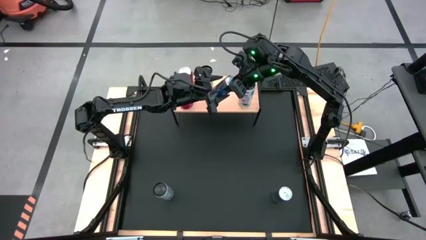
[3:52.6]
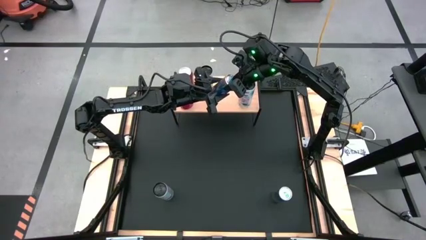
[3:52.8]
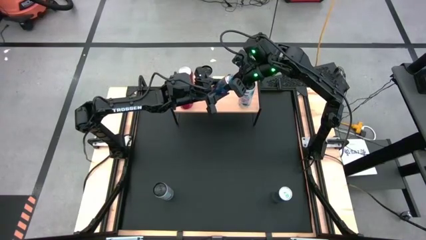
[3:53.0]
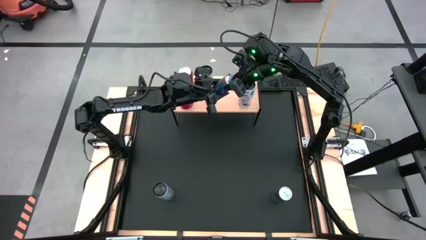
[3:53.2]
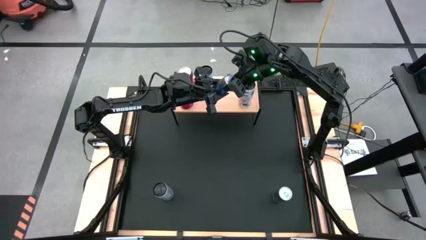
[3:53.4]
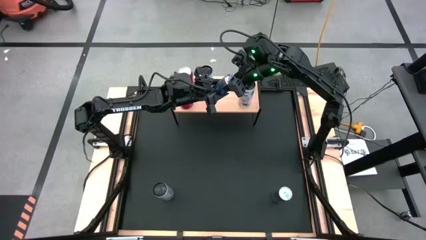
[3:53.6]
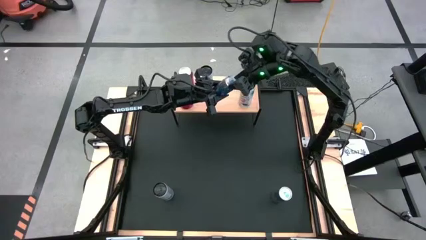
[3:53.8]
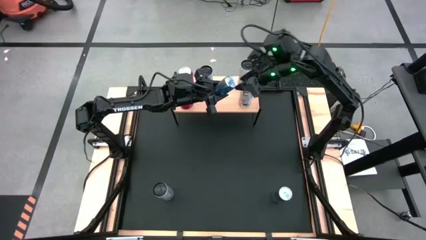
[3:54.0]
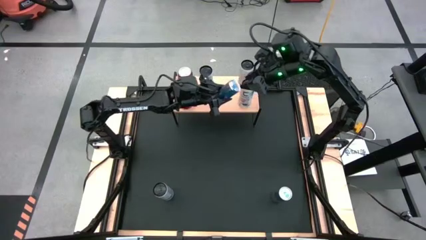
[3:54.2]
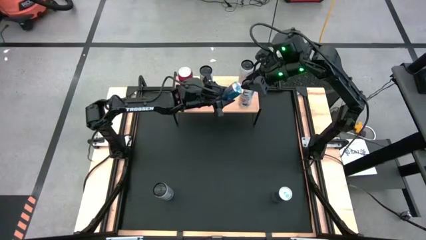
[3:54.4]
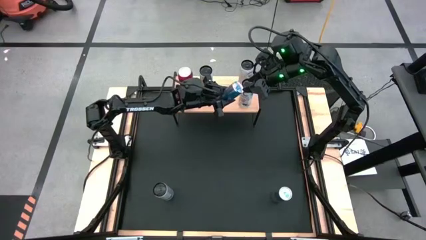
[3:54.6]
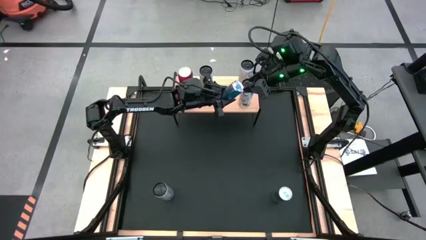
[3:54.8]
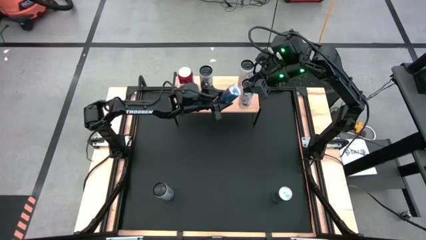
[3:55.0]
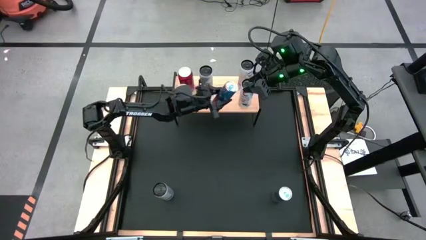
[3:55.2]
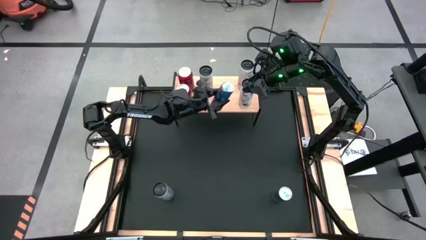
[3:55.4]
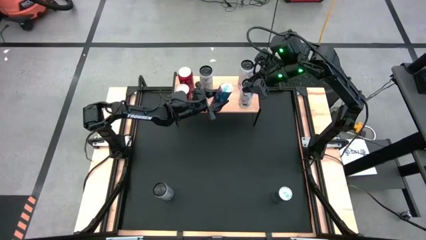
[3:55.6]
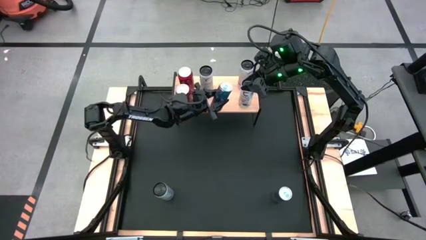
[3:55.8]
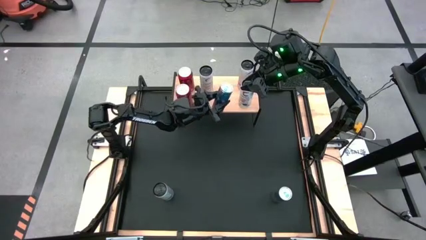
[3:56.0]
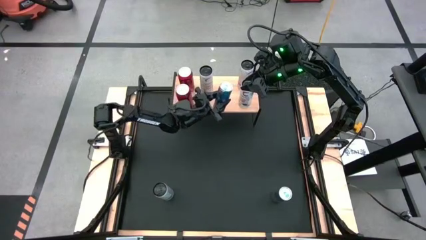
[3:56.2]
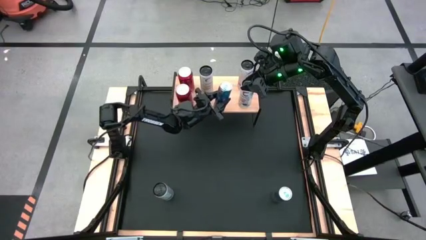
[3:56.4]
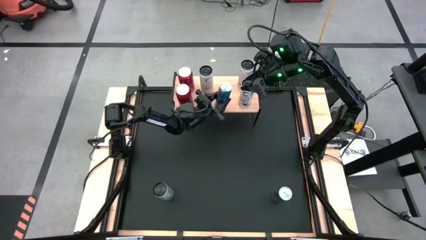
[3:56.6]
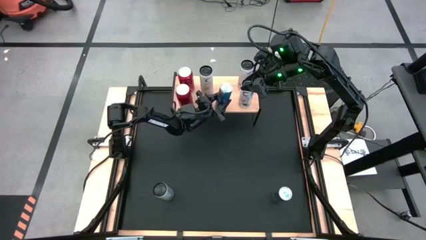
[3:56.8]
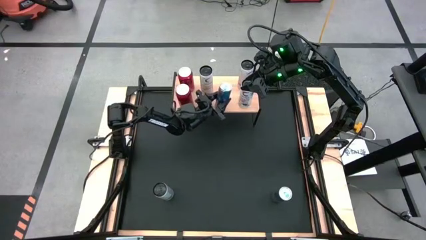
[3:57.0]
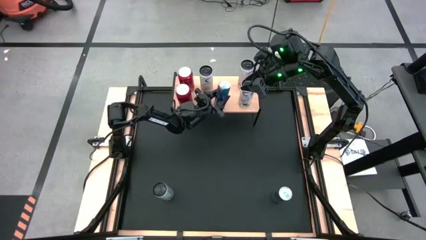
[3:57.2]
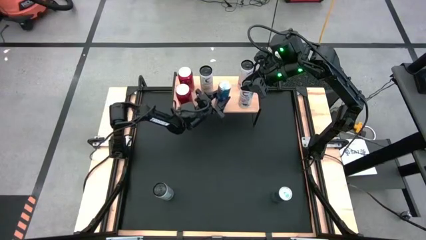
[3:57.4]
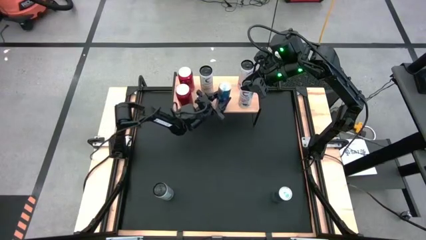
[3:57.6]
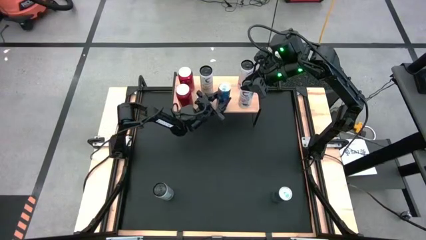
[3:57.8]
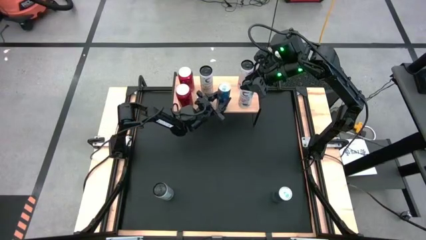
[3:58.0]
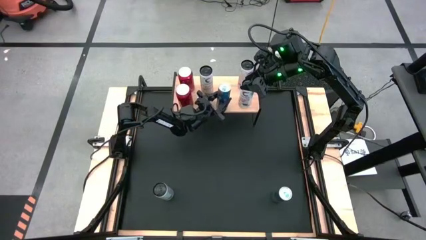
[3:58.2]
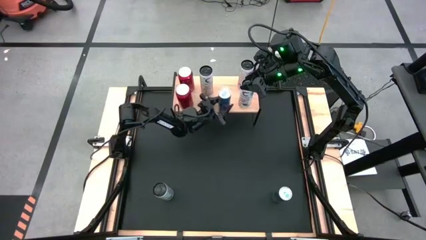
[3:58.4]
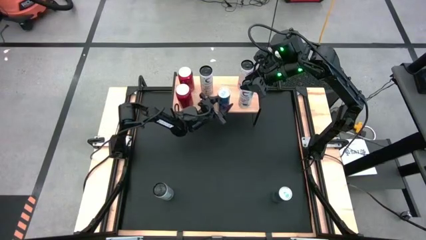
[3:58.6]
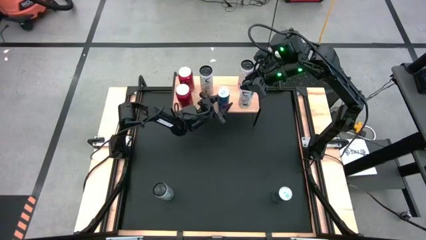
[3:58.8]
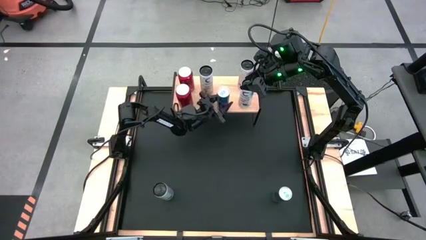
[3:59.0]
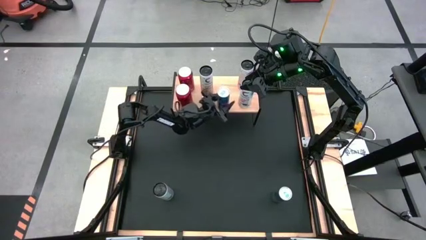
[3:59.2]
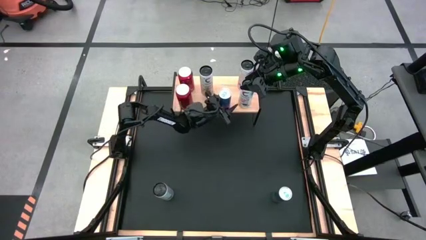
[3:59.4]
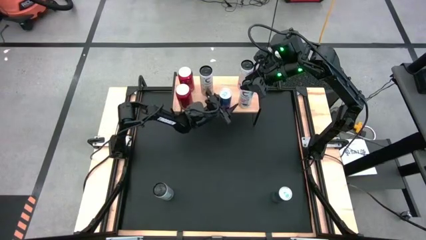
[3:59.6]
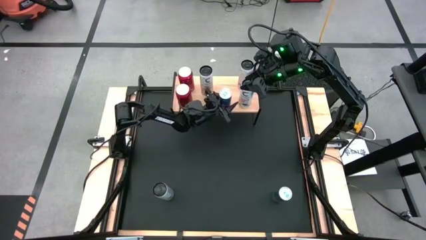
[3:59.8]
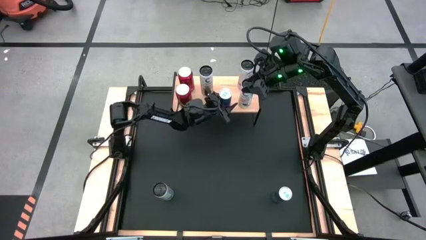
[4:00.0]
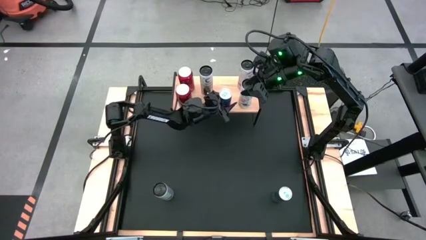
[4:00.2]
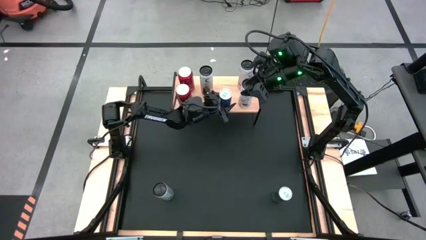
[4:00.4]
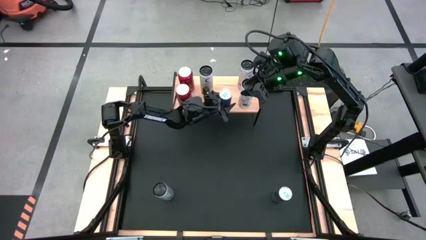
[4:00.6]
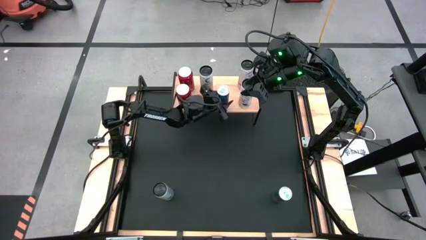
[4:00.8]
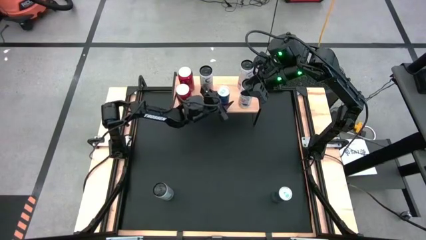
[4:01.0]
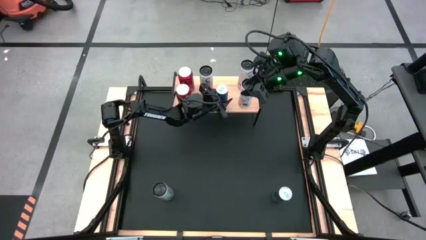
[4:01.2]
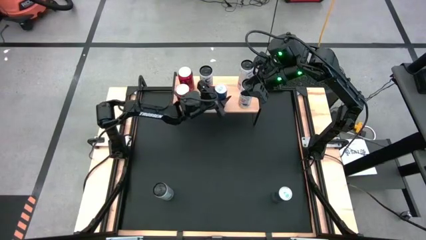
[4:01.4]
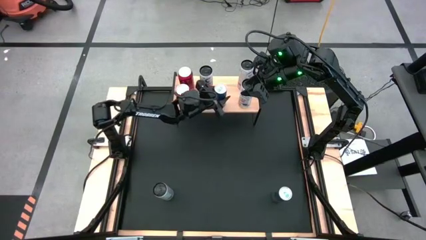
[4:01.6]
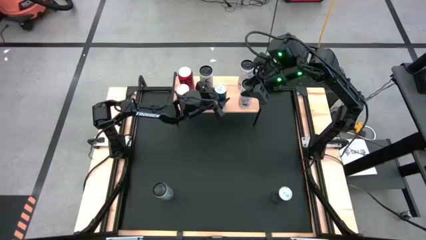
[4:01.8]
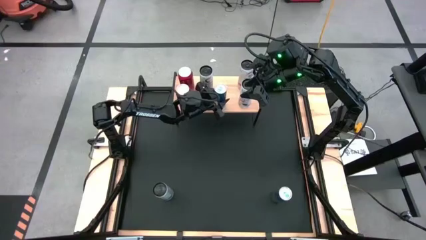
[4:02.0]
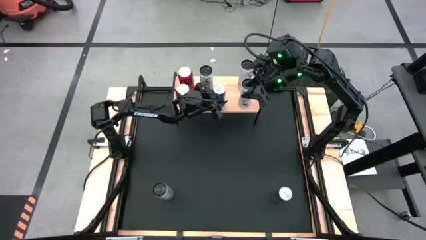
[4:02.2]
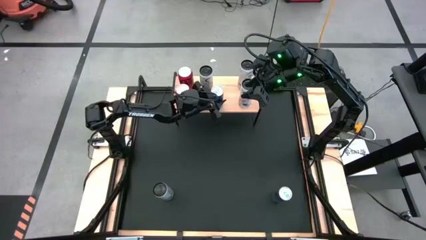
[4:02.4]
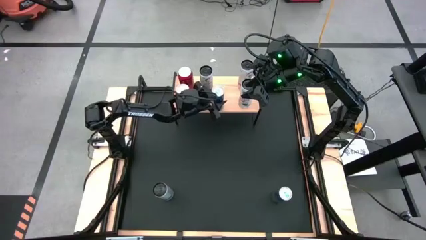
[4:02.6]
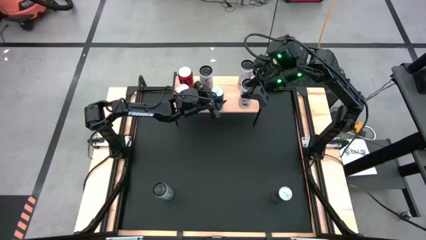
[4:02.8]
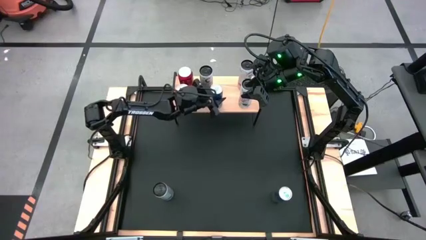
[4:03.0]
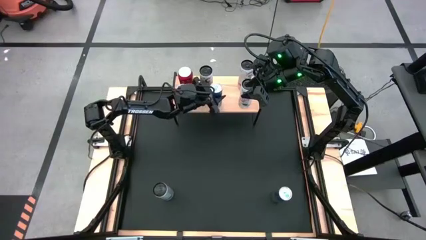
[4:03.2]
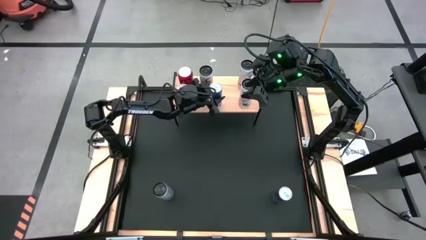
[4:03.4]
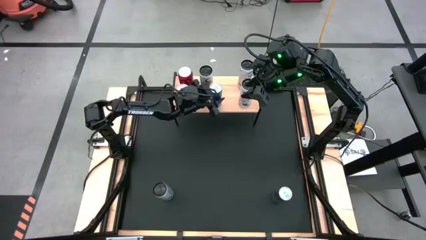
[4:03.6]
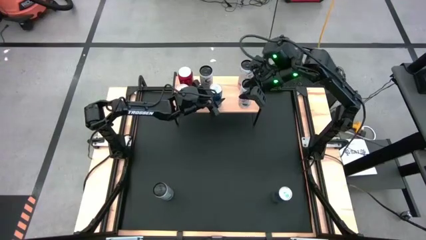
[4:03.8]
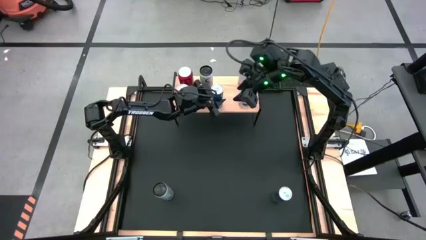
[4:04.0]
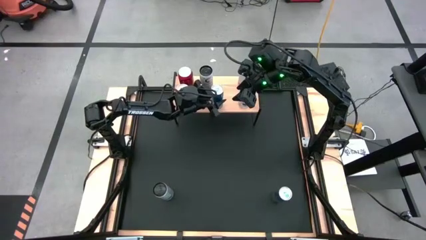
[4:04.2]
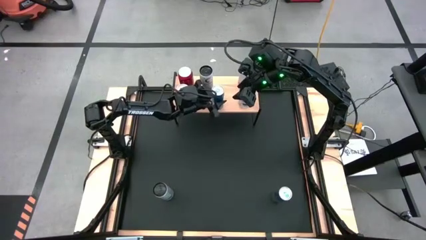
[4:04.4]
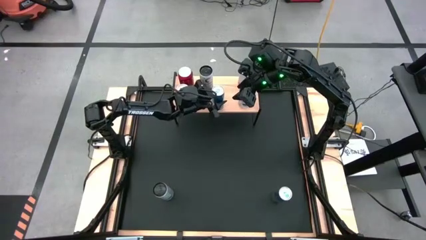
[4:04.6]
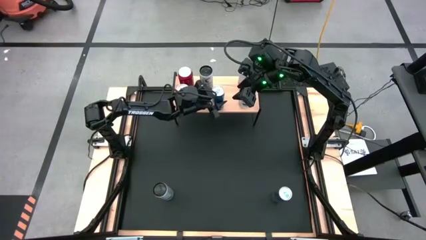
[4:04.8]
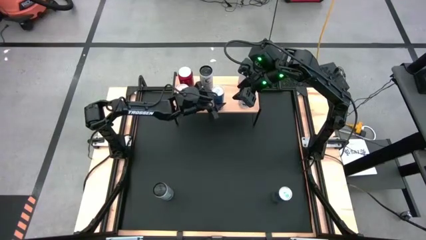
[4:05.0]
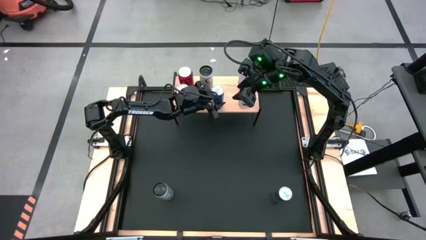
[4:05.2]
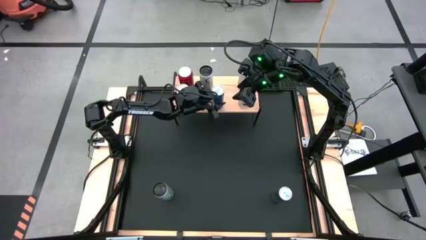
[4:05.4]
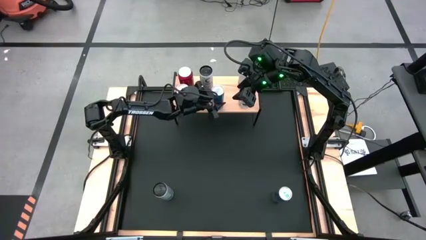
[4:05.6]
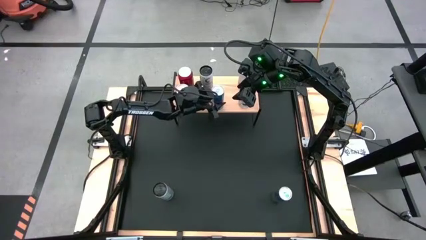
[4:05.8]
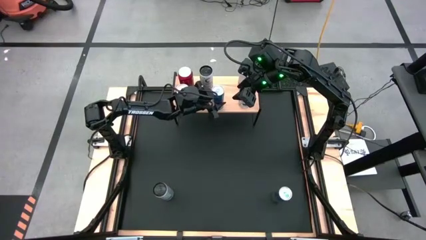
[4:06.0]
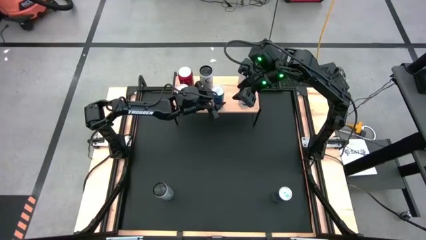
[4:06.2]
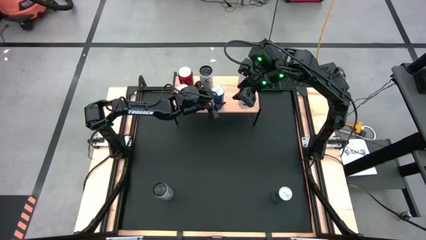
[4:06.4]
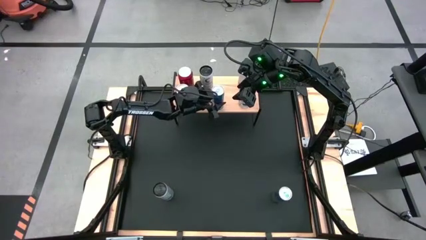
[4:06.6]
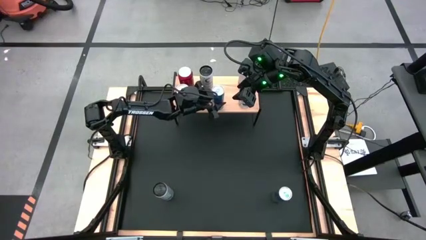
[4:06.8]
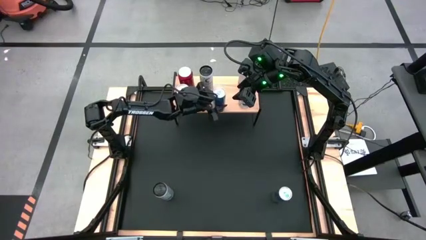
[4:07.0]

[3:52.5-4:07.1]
Task: Place canned beverage on shelf
Put the top blue soda can on the shelf

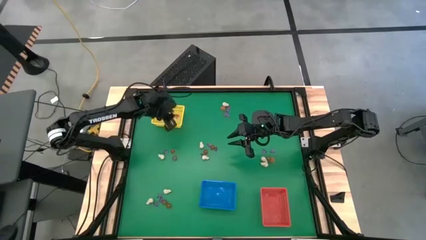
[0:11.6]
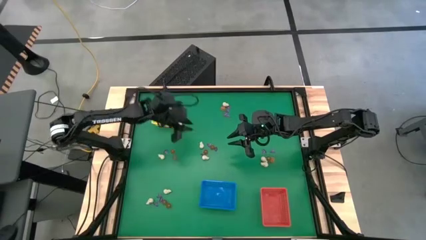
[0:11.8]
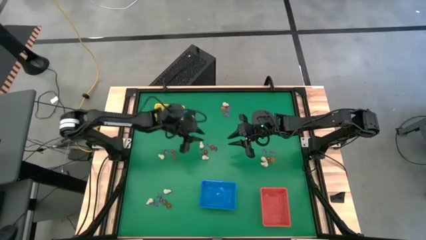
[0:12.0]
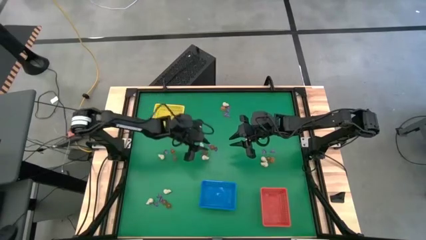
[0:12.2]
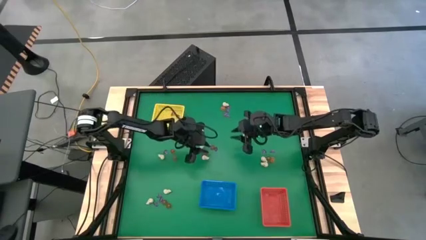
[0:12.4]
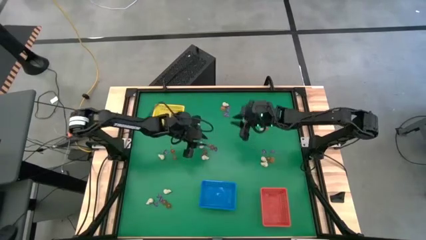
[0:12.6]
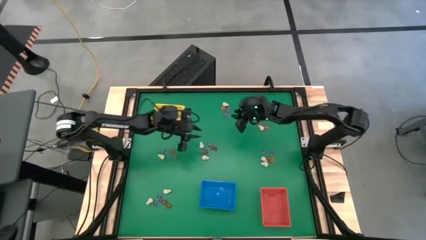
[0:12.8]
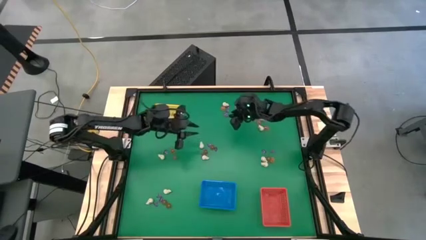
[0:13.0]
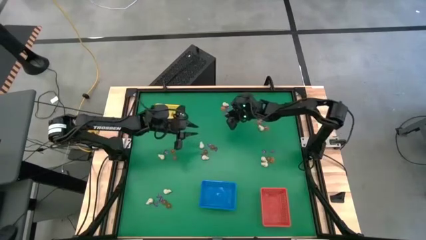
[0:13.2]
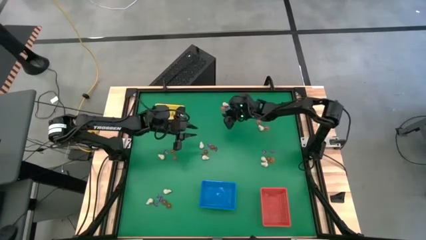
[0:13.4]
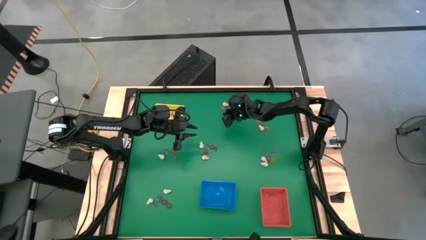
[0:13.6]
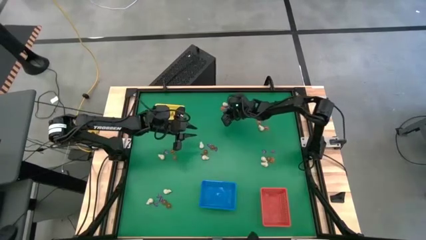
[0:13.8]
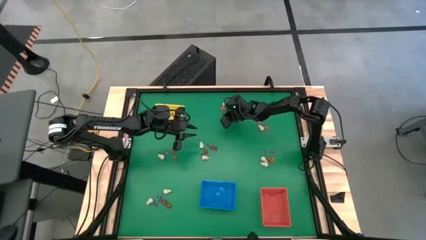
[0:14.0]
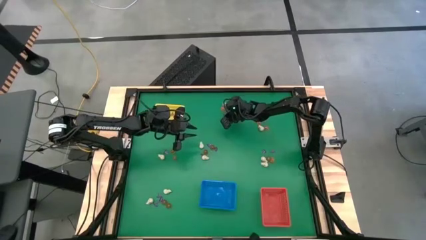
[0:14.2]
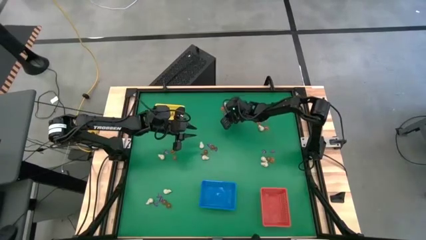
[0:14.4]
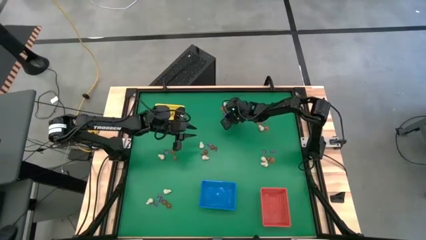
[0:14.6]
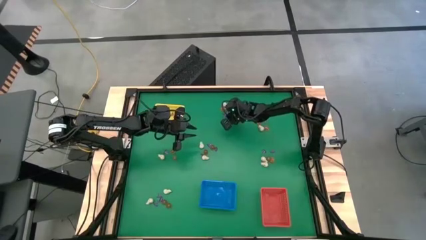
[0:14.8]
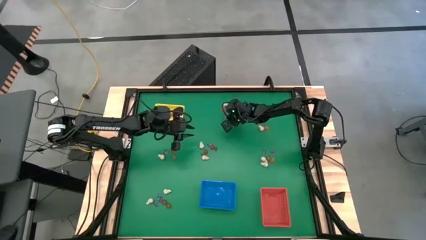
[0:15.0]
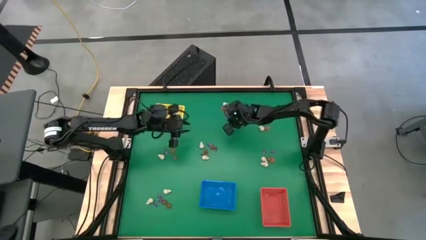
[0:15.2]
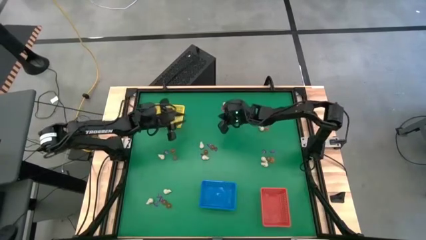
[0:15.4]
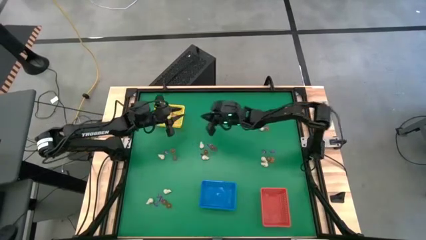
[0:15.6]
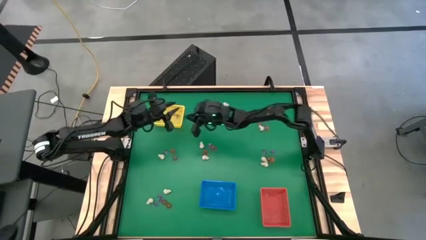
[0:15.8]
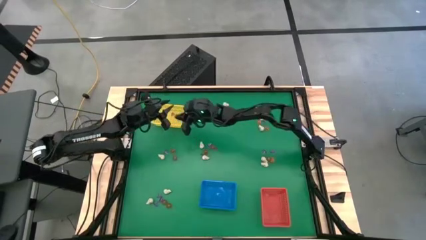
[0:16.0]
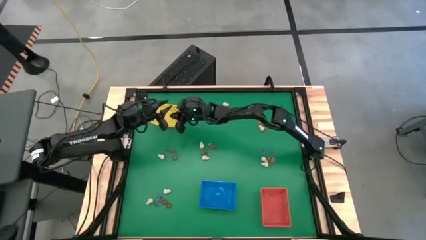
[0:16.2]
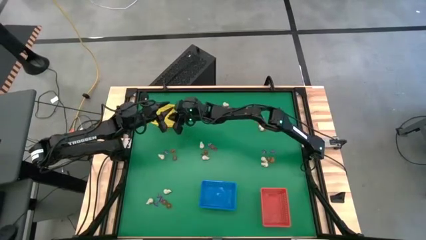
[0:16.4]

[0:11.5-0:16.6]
Task: Sort Halloween decoration
Put the purple witch hat toy into the yellow basket
